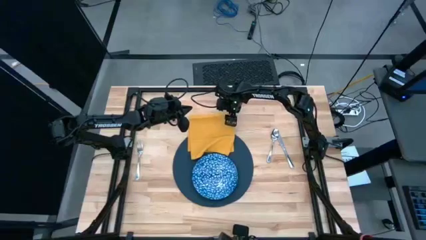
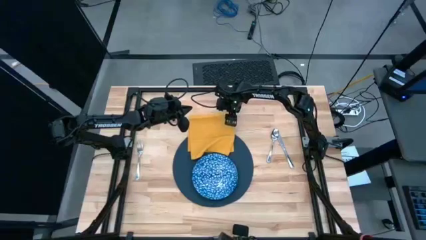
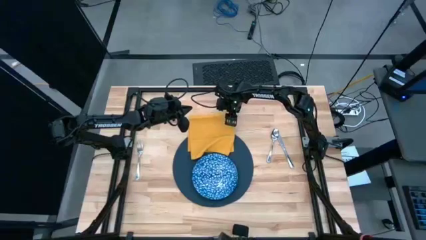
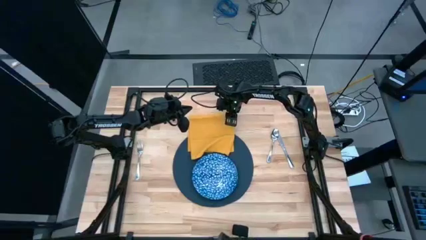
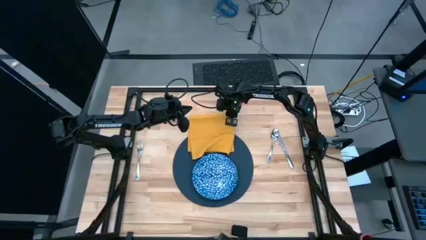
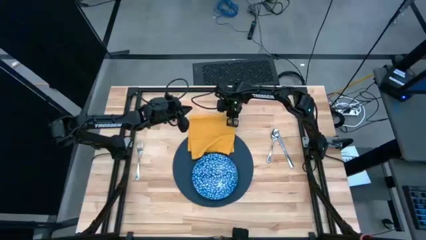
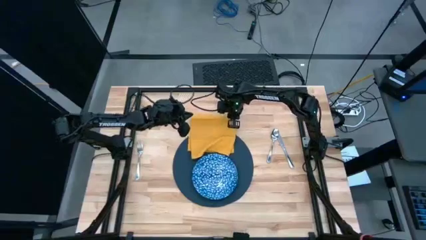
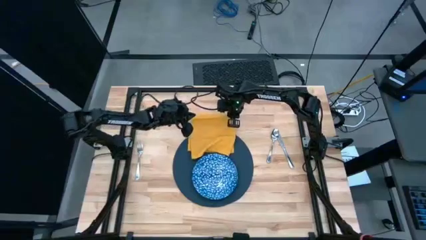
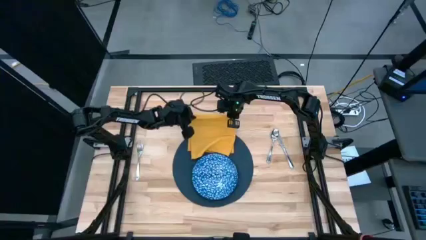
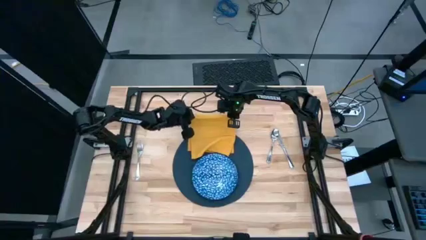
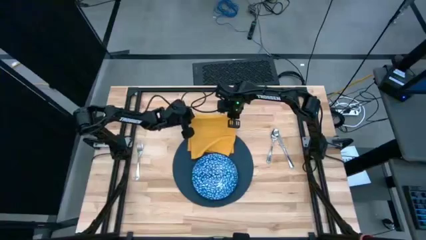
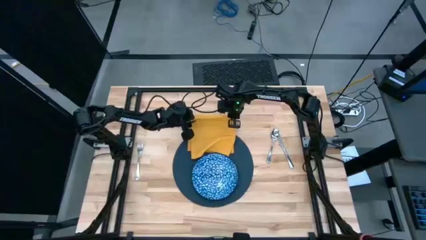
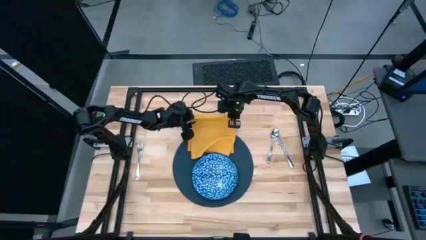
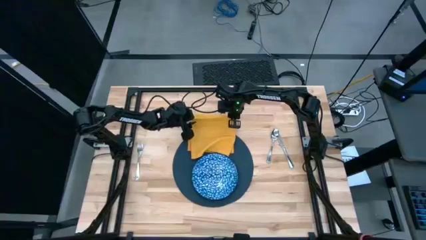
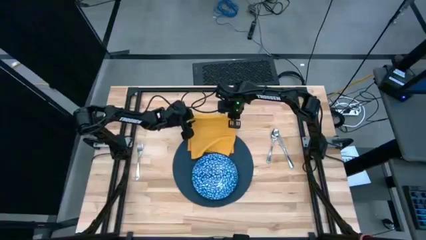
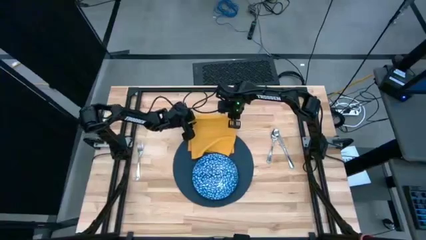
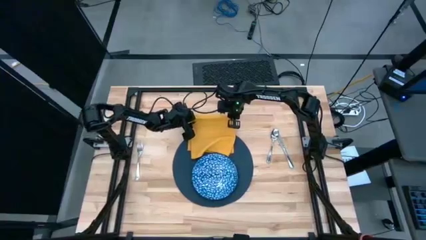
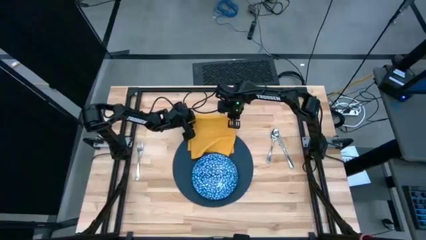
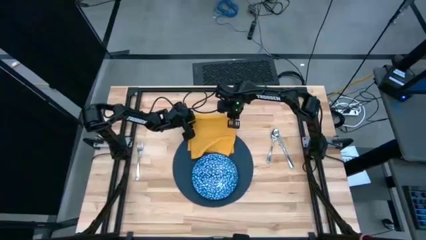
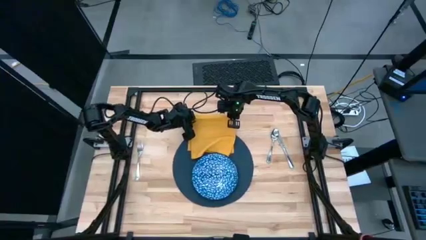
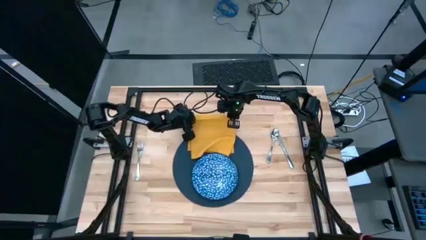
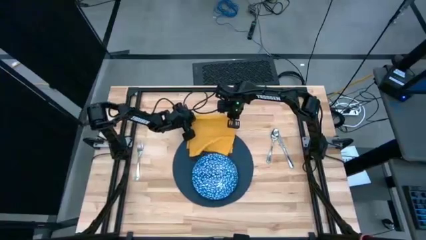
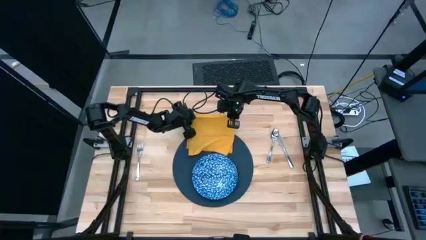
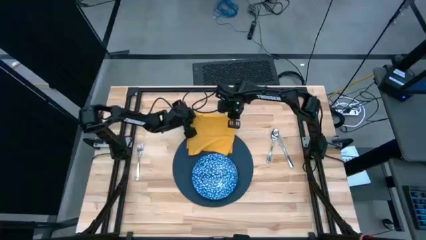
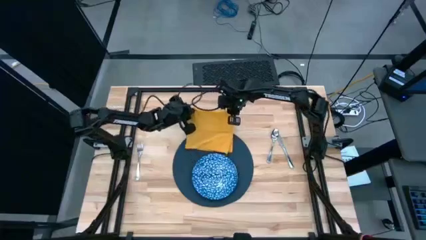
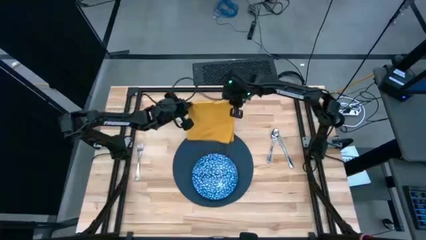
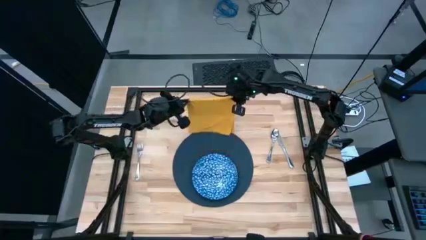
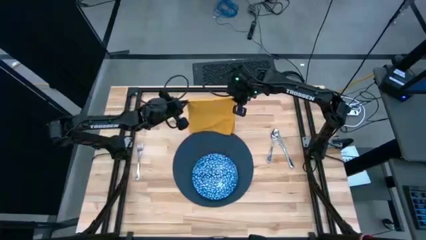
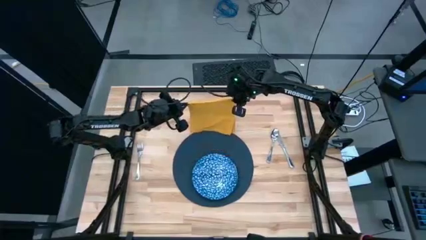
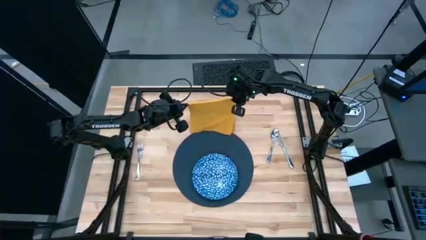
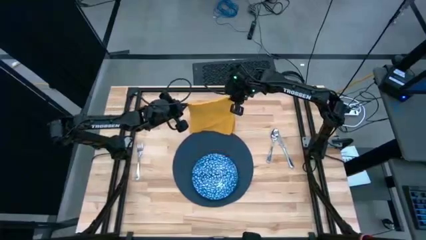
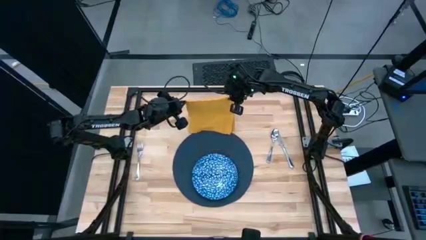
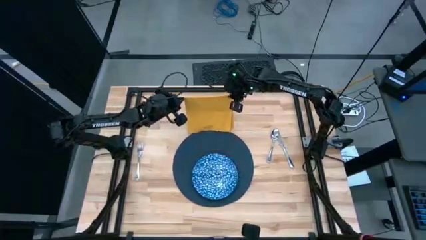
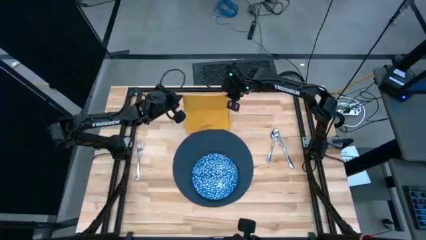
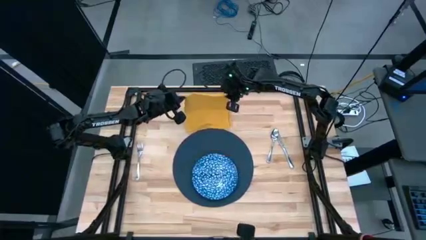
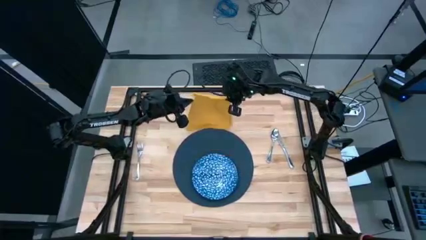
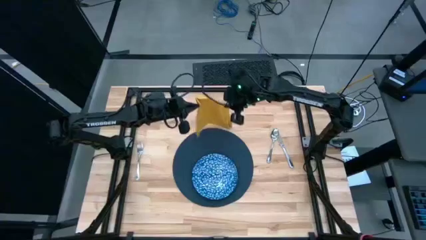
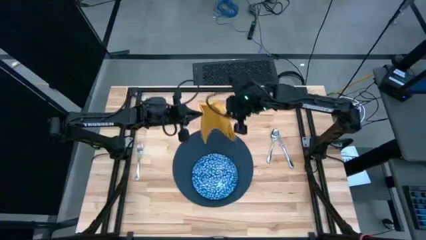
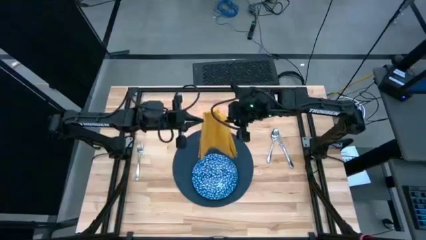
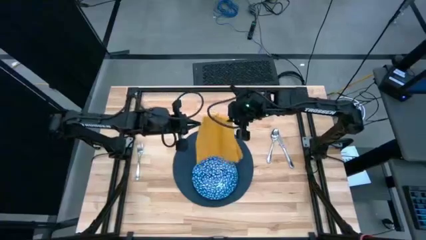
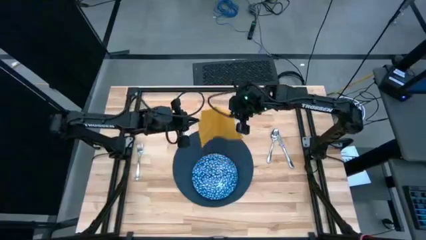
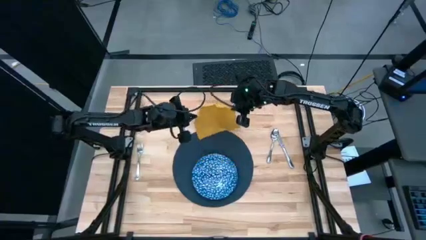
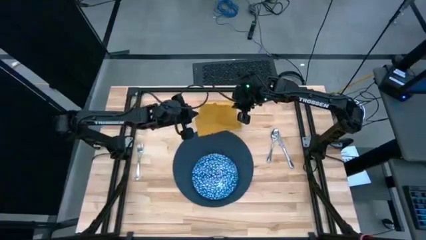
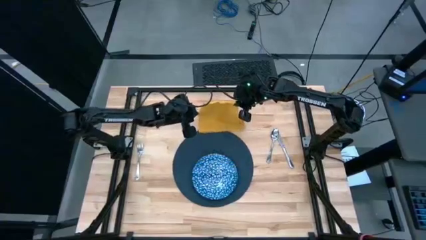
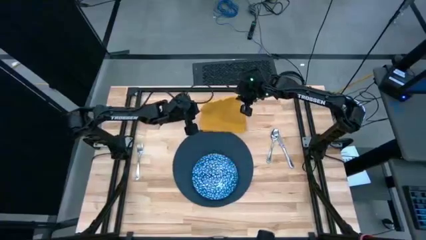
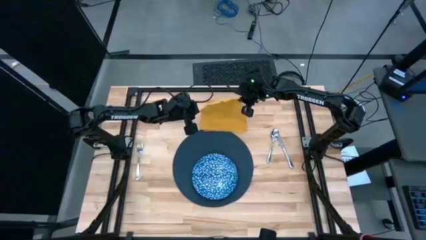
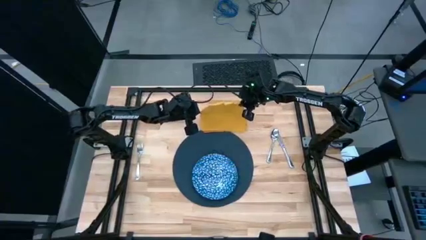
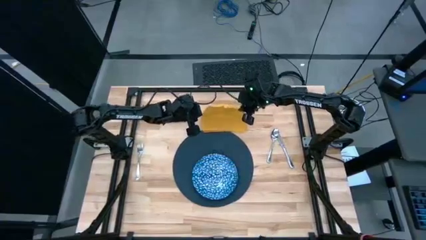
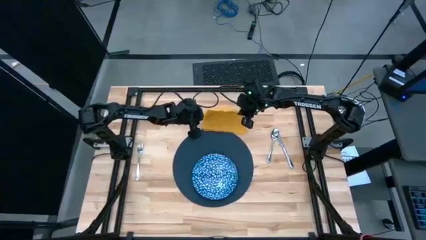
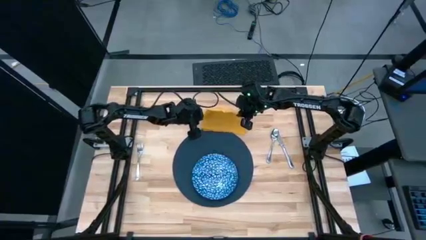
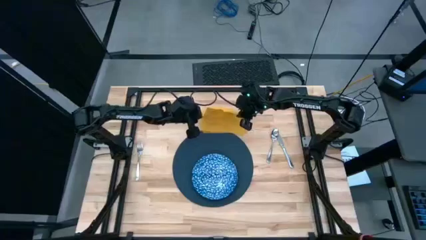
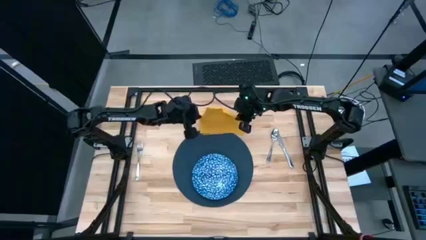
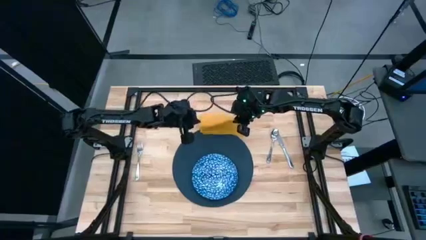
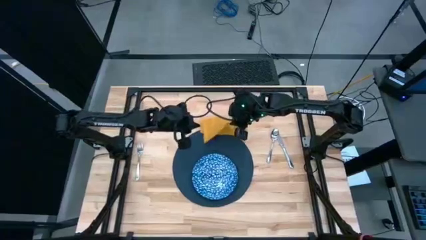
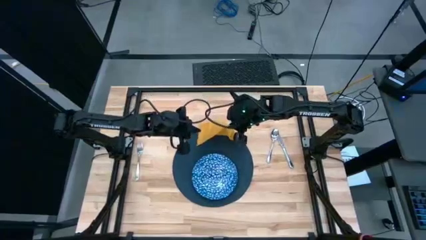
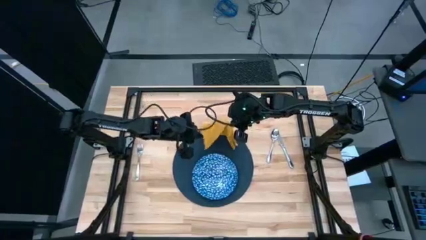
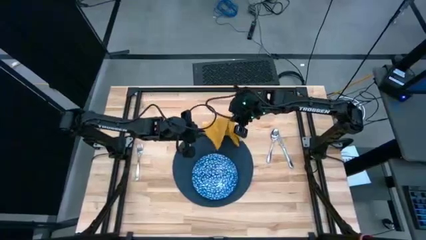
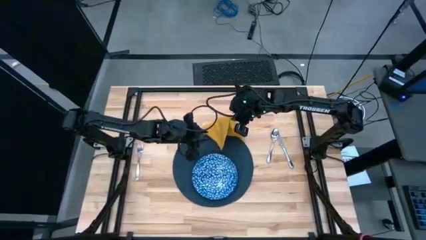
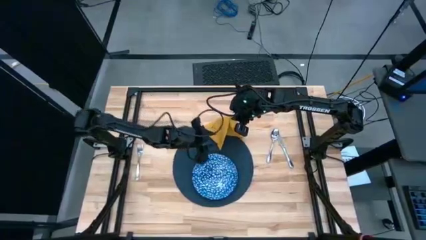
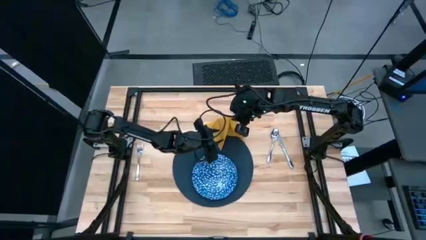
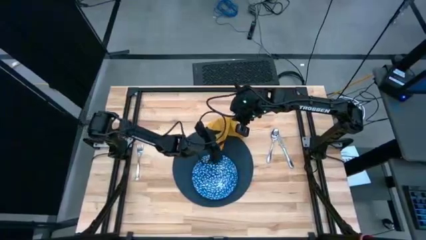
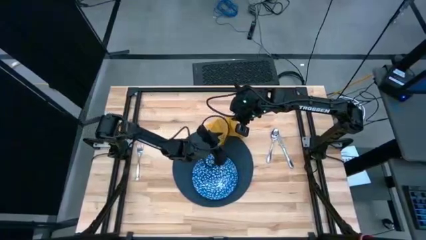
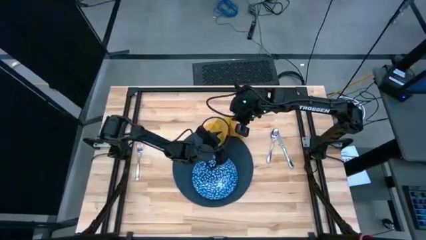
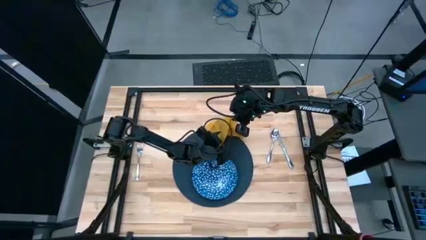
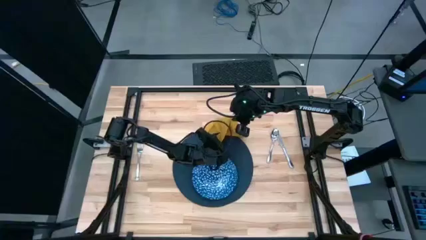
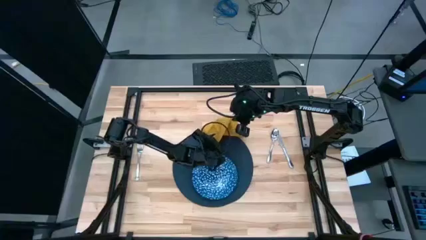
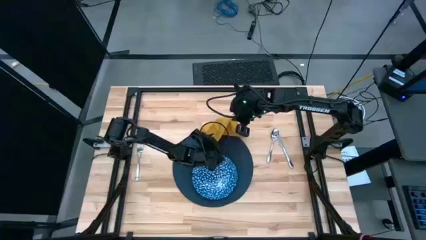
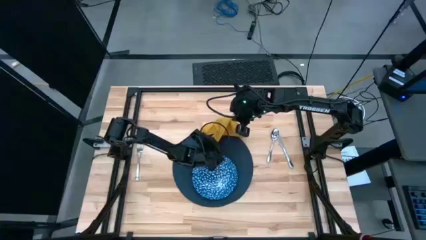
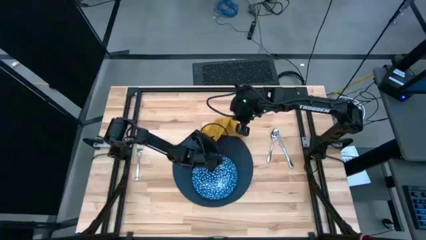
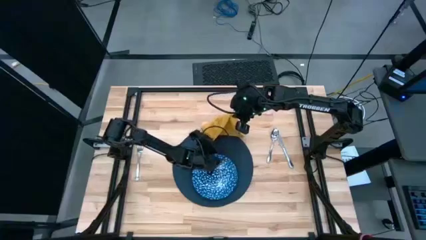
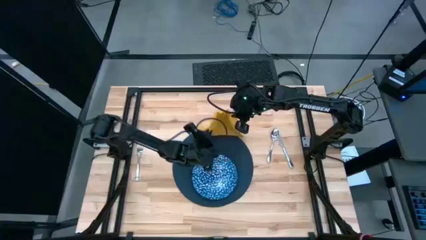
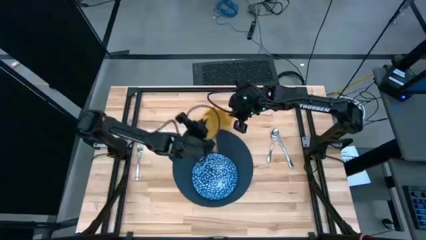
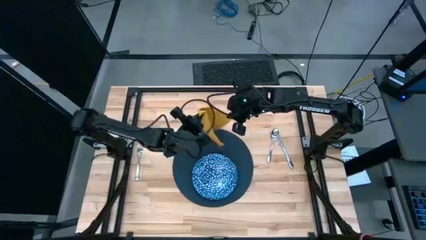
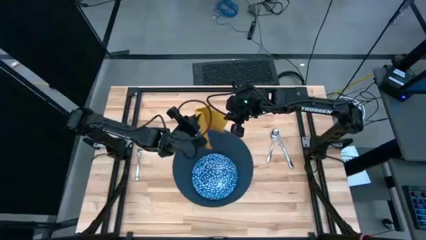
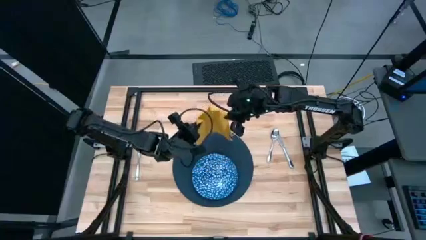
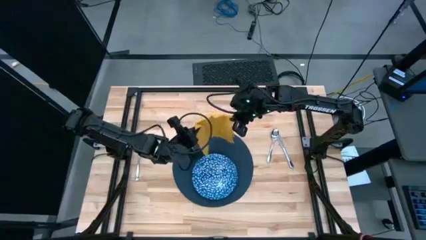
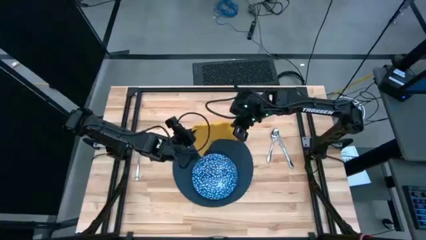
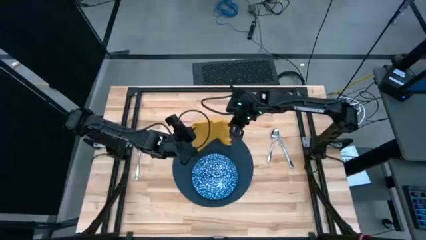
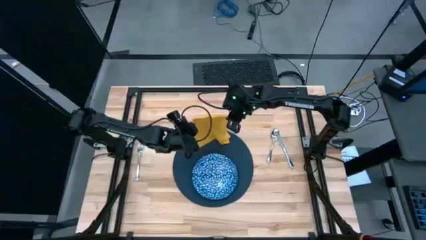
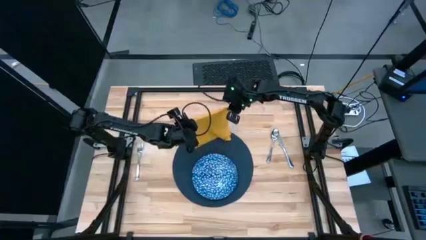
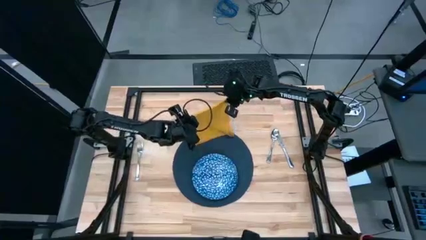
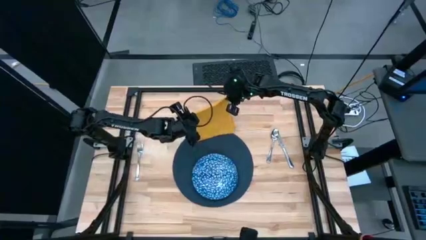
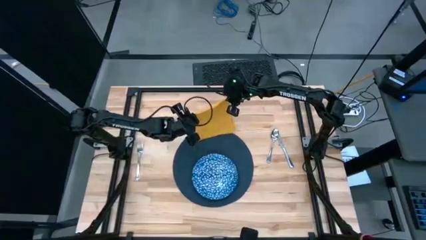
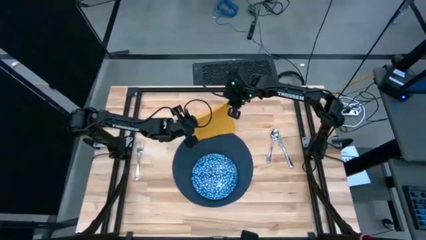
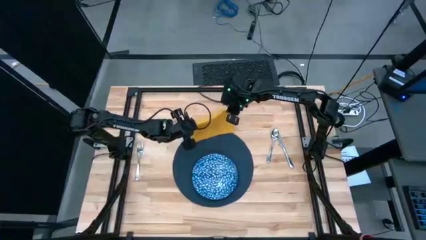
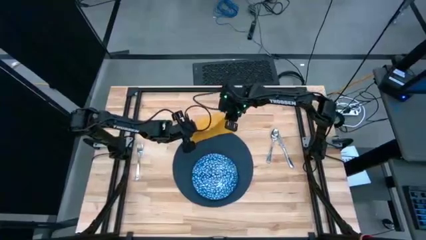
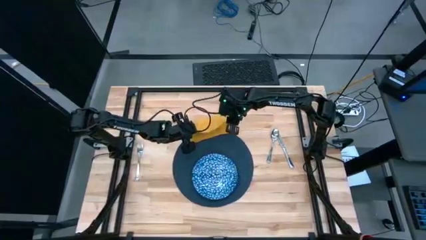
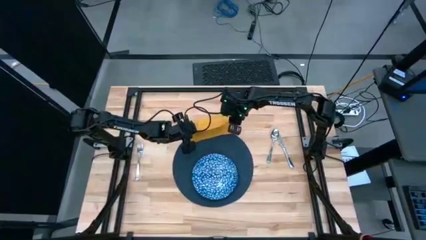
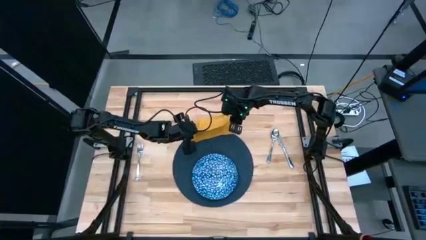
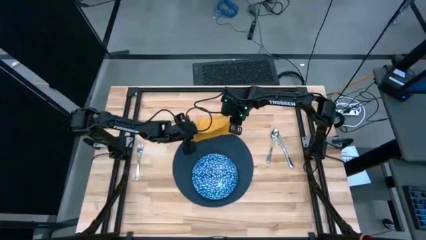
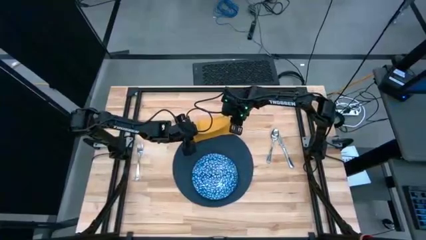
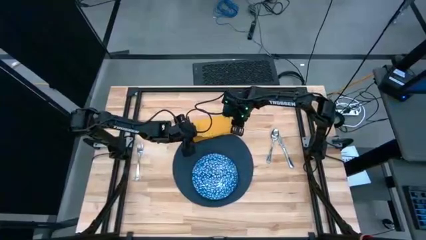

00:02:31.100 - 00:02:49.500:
Task: Set table place
Fold the yellow table napkin
